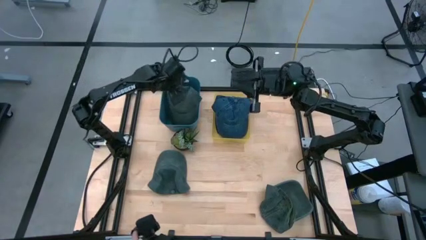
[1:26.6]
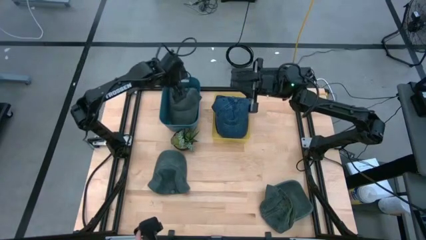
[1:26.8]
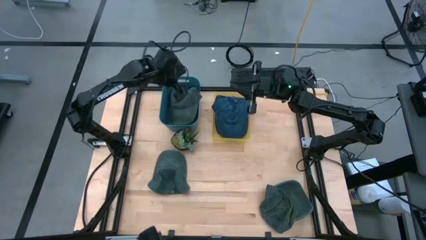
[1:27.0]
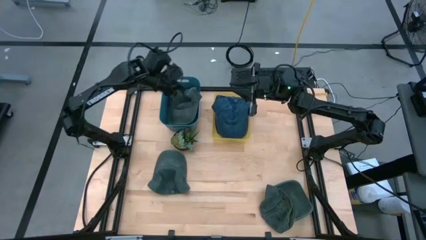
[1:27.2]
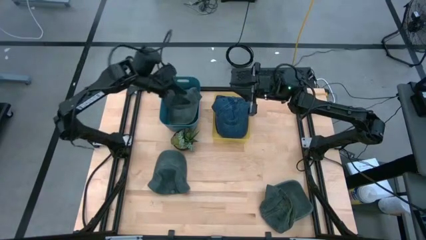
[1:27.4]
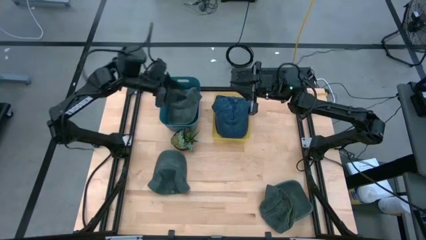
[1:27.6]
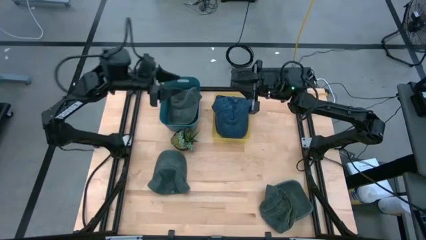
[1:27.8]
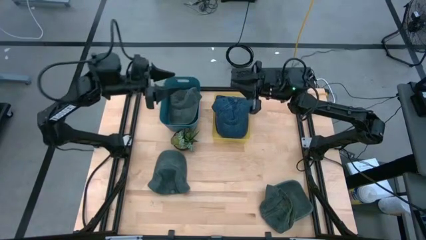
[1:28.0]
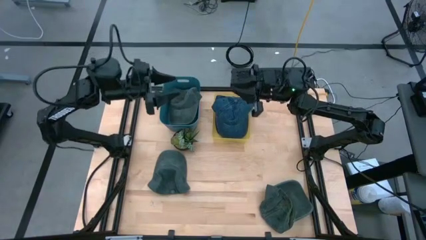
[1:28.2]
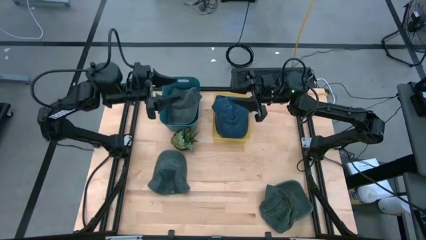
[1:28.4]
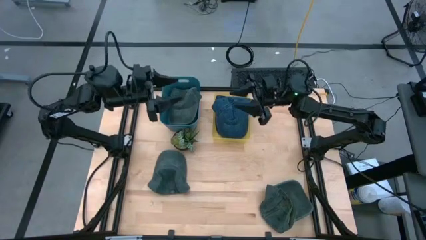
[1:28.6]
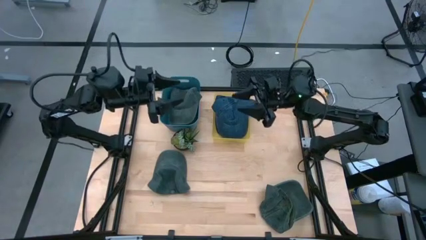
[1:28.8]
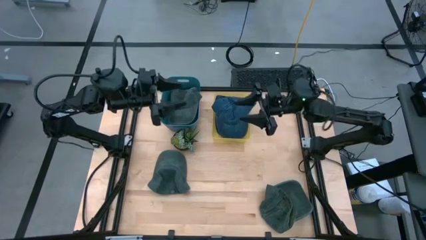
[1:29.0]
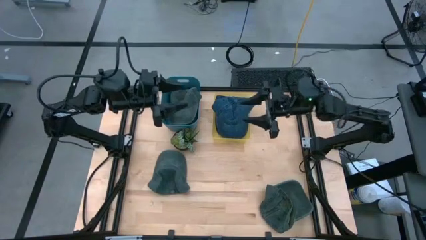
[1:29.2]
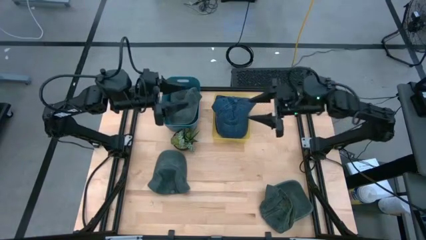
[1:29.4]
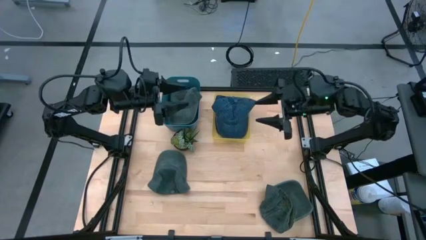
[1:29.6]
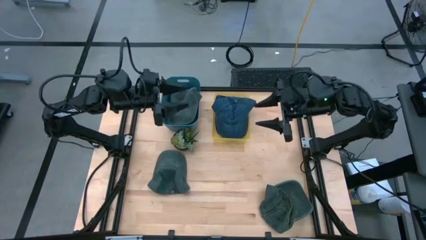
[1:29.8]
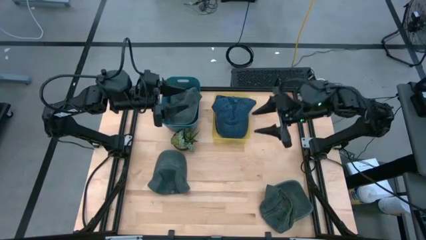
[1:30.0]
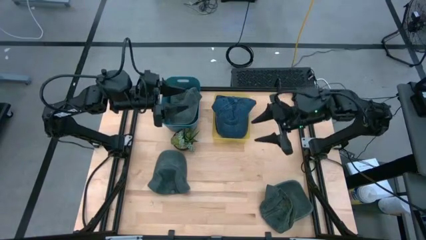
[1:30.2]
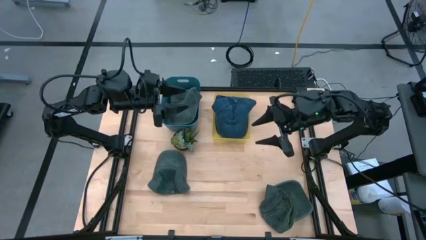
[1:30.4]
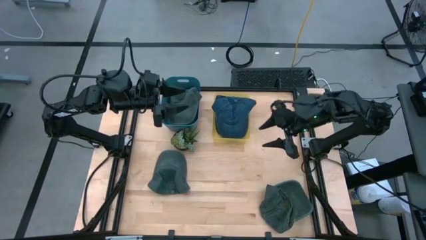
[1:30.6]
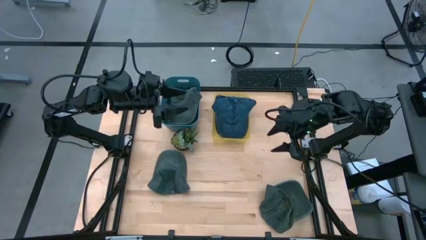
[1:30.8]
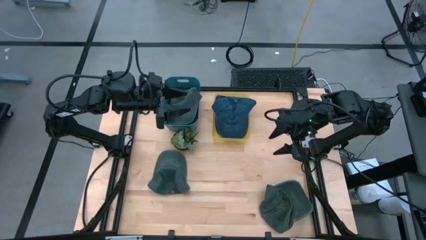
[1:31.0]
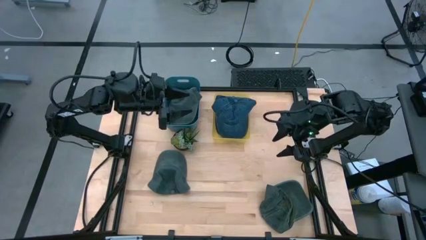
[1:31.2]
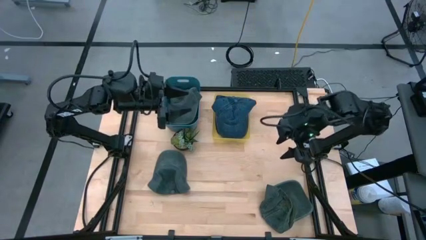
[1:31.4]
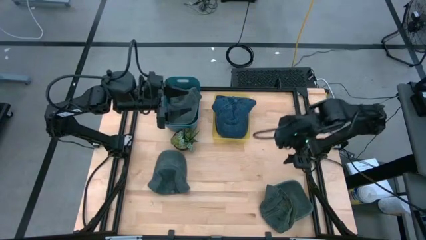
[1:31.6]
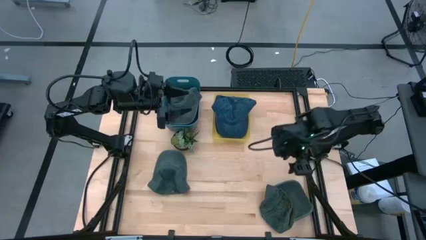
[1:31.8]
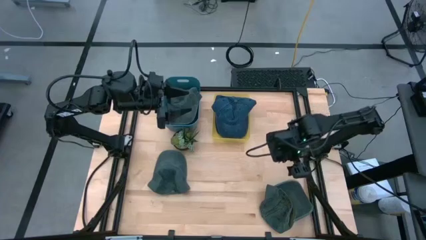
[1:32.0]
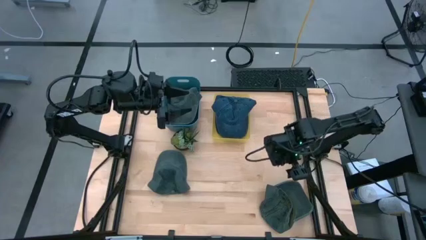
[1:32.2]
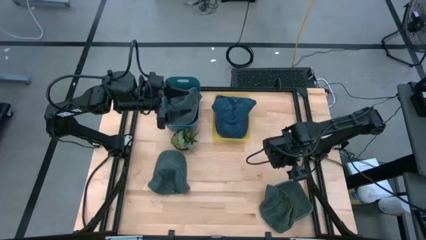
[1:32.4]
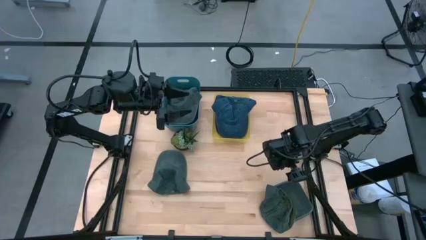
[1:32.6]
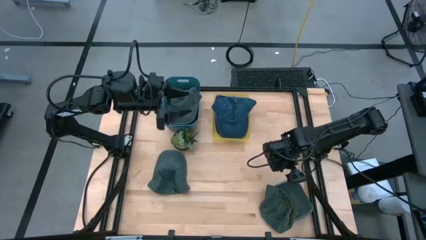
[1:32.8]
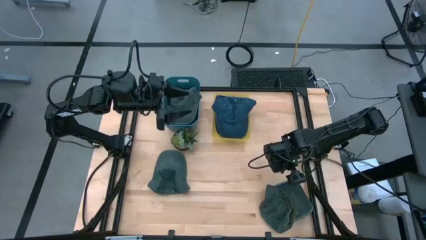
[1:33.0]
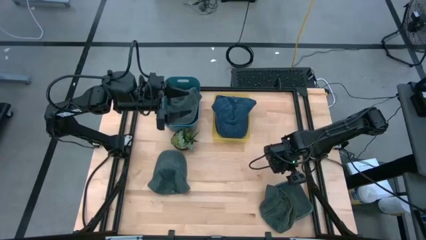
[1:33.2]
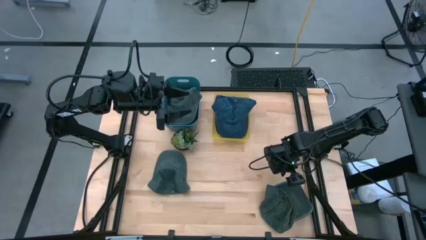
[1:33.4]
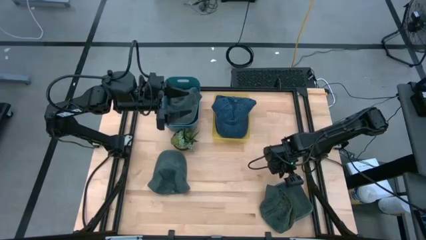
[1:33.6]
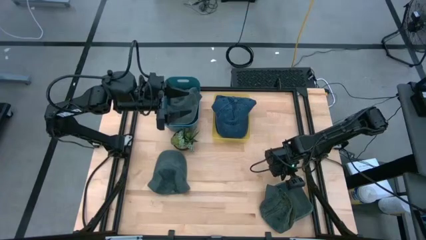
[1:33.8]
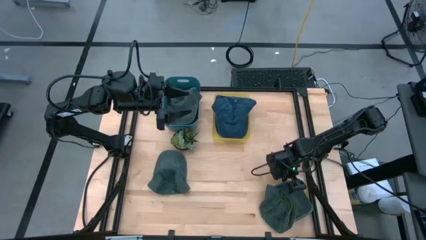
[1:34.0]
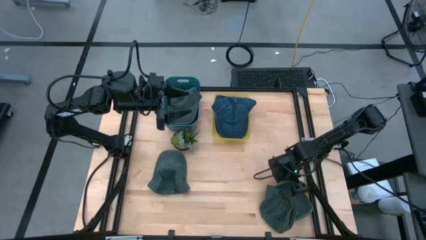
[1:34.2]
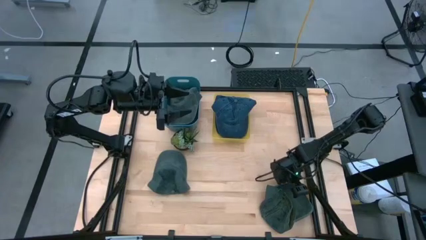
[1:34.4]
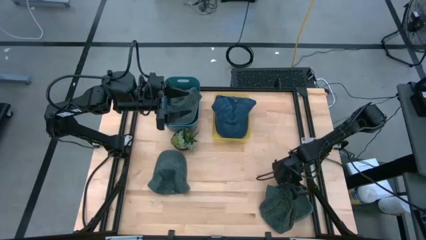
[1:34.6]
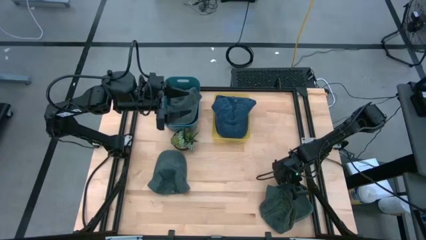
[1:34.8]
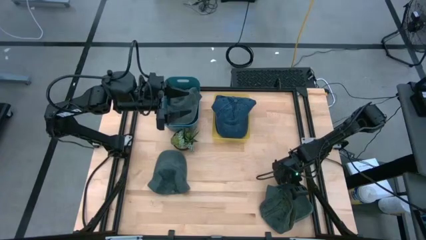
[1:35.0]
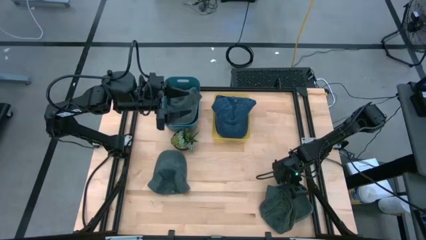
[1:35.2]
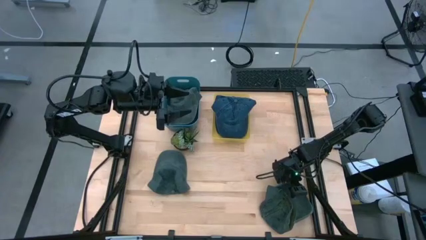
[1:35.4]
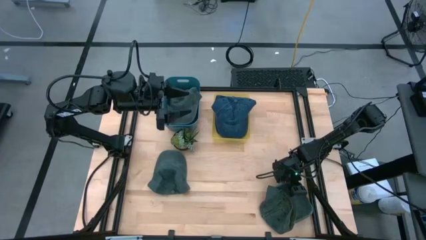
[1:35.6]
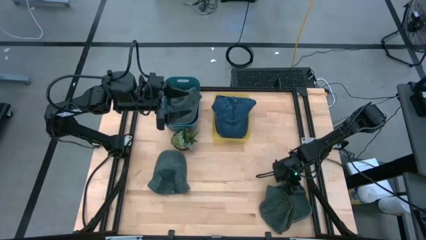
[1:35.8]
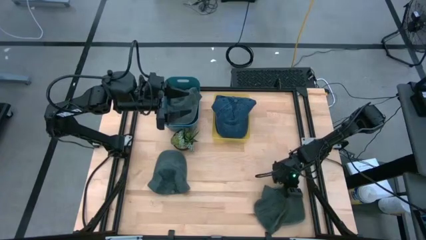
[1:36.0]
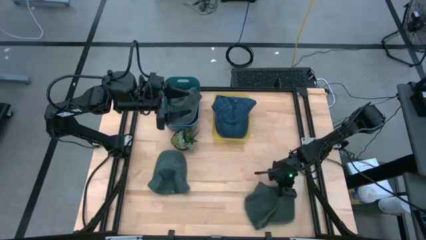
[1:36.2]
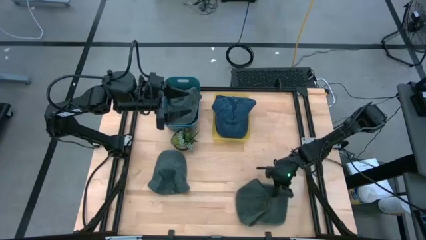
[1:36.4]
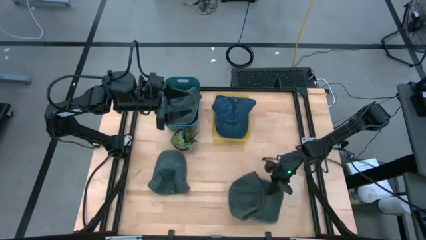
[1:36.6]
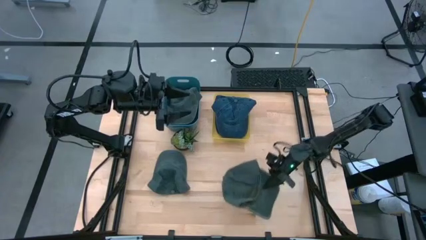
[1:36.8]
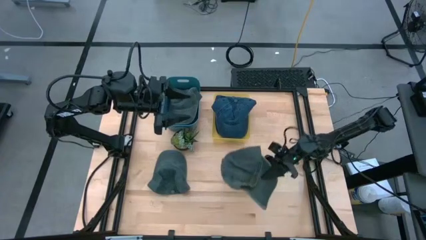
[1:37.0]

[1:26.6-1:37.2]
Task: Pick & Place hat
Put the bottom black cap into the blue bin

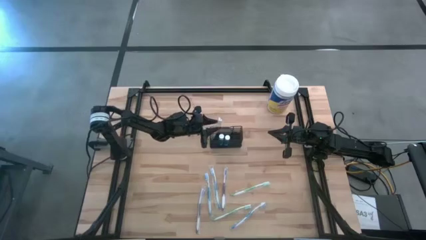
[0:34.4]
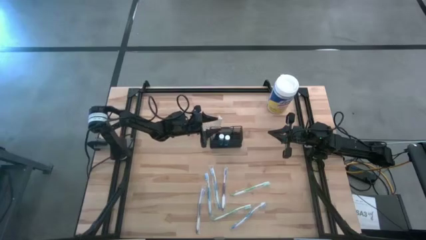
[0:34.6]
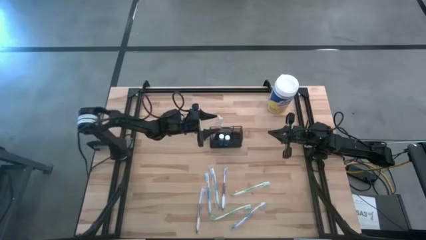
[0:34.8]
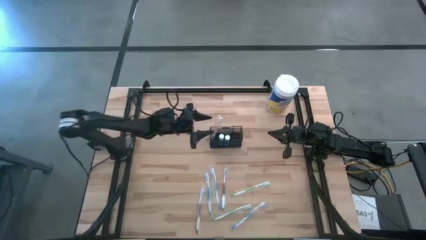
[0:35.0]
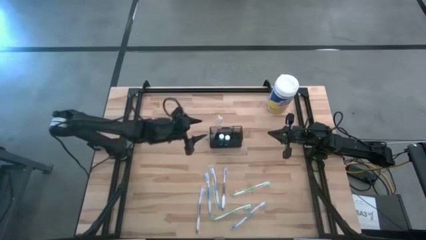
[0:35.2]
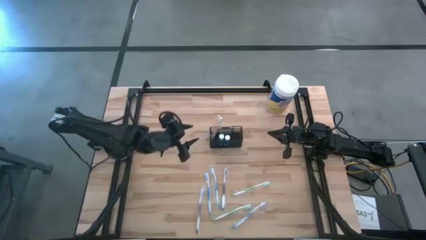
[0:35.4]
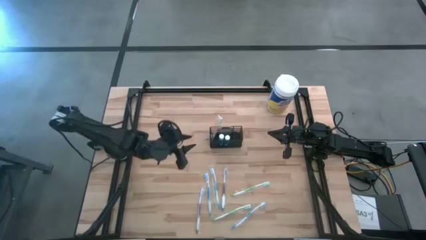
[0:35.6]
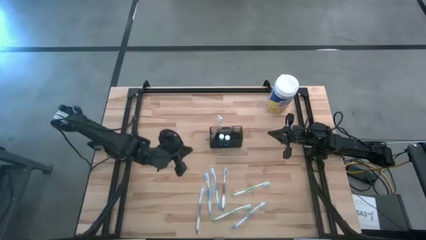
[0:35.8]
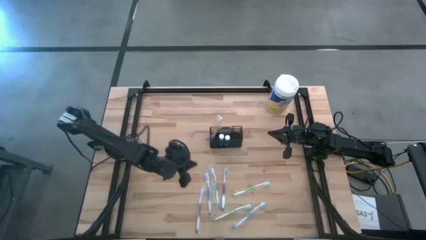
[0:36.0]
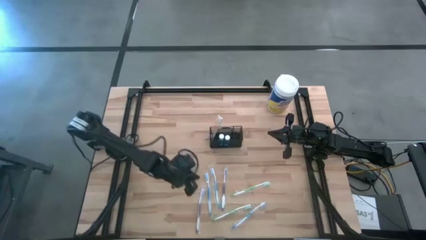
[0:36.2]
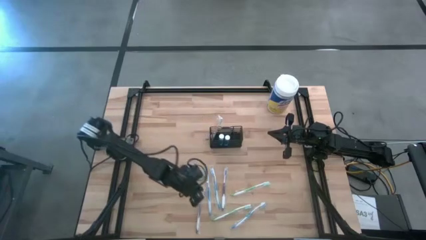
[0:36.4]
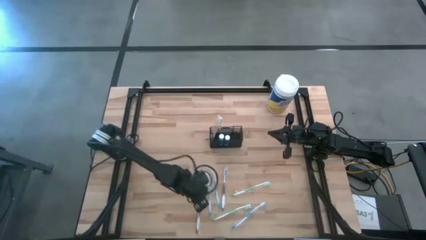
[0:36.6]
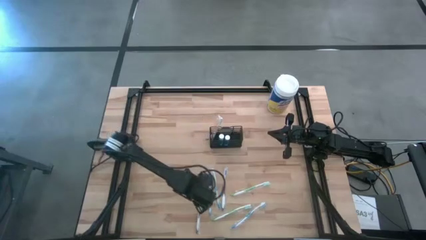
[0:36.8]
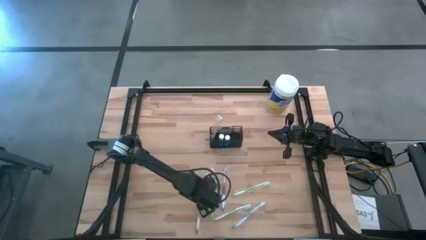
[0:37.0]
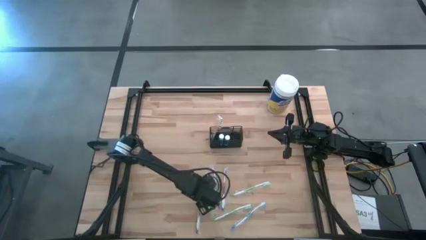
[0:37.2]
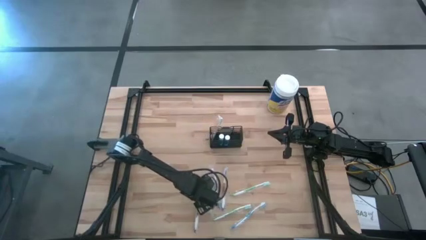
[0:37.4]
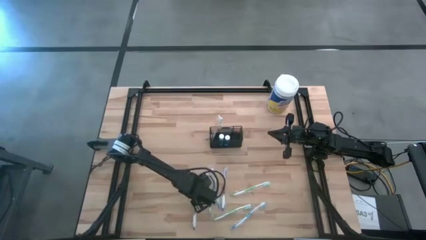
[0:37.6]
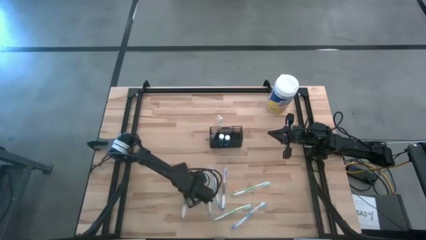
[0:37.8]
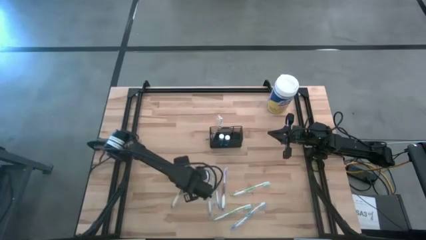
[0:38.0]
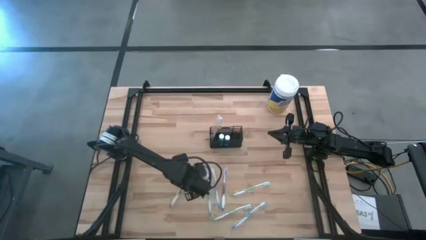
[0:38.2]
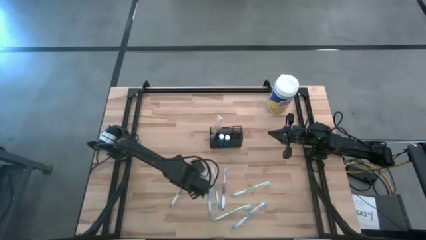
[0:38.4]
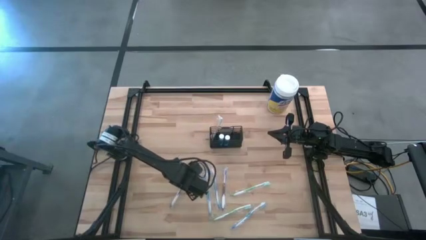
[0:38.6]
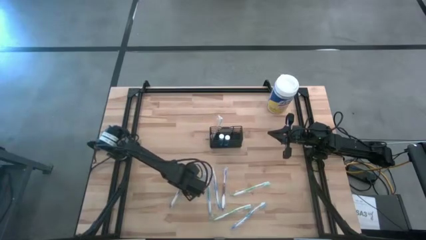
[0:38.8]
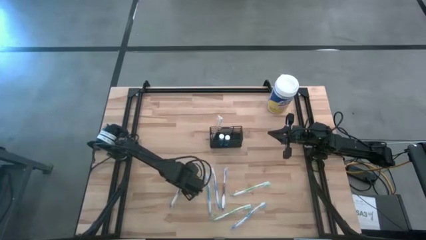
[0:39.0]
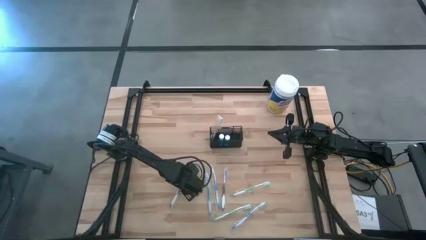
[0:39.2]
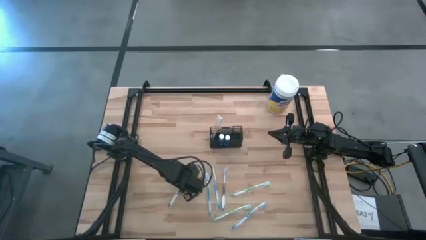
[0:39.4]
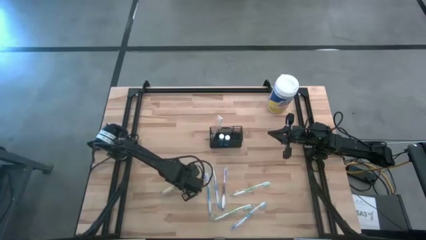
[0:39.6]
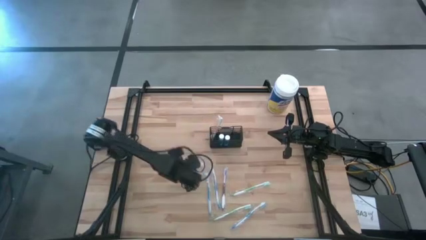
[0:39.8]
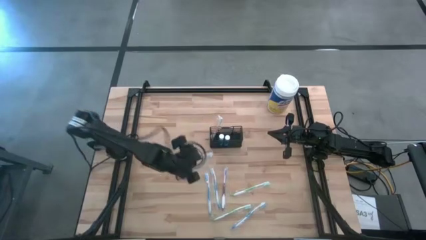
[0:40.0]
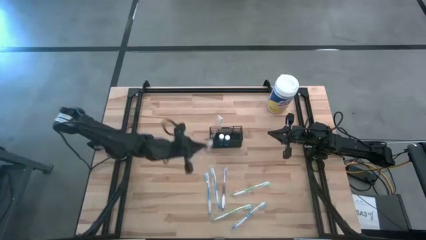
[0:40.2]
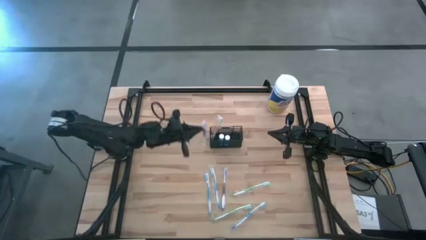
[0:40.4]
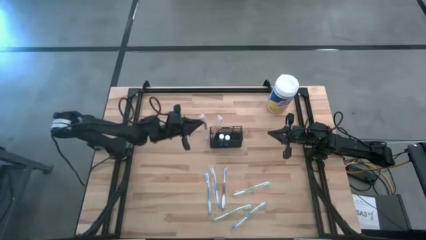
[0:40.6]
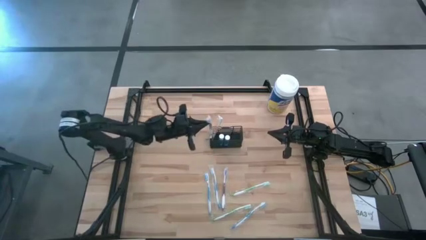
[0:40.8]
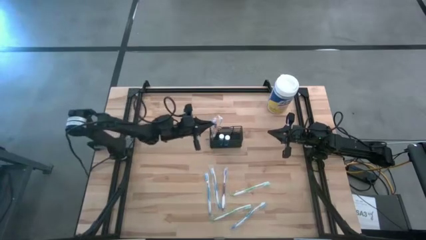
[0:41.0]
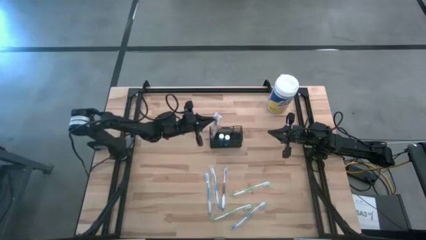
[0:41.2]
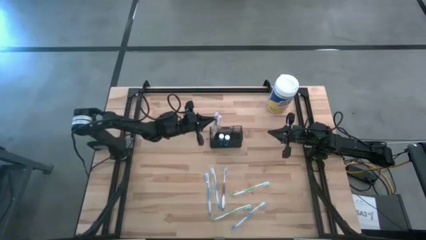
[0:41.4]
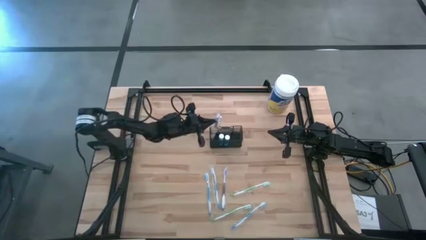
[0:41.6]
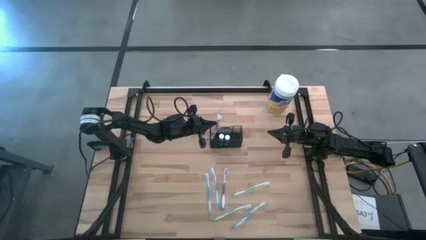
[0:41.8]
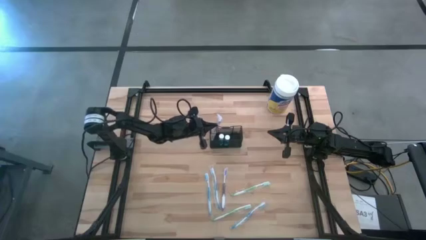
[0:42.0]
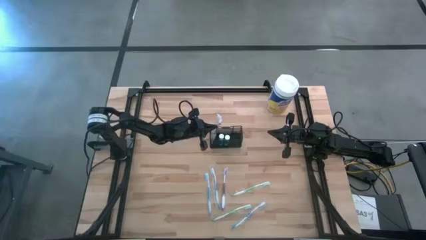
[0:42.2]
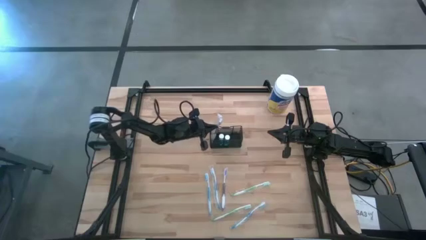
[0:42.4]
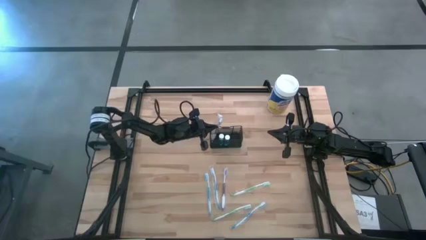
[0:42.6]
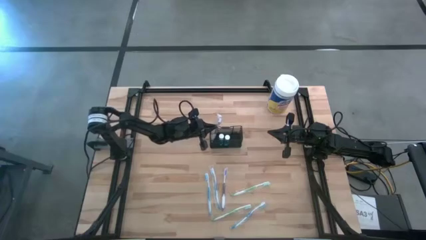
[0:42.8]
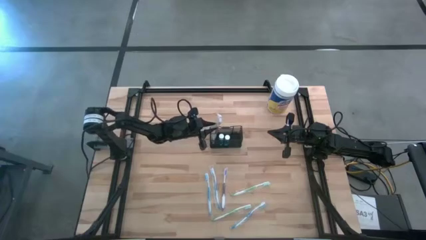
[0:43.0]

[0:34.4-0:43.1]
Task: Pick & Place toothbrushing station
Put the left violet toothbrush into the black wire organizer
